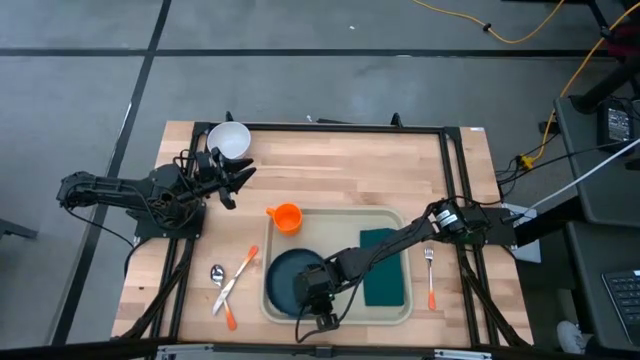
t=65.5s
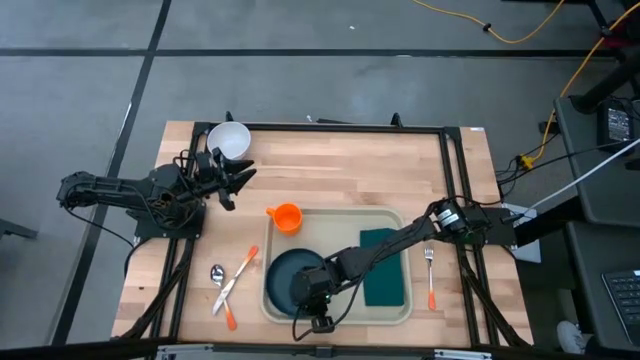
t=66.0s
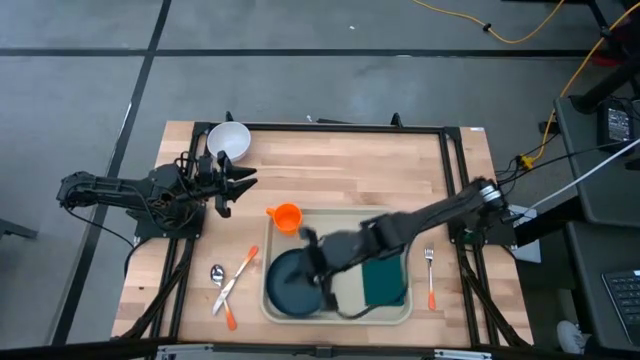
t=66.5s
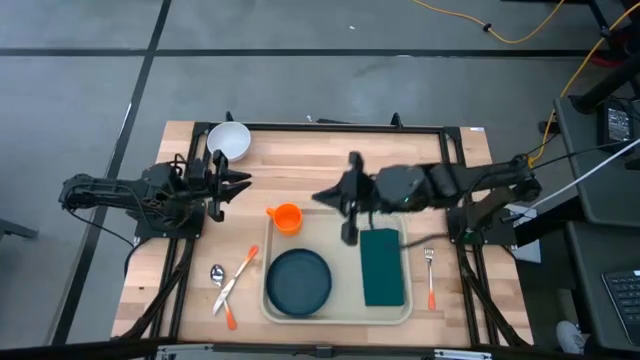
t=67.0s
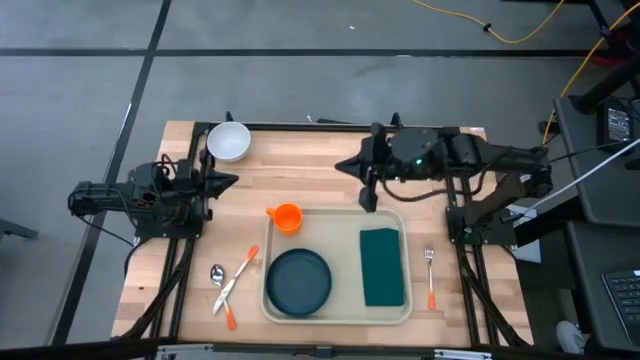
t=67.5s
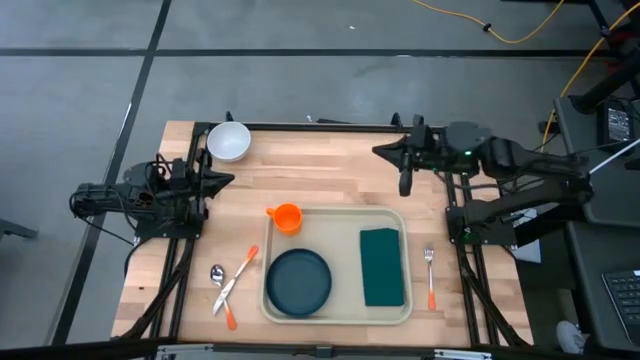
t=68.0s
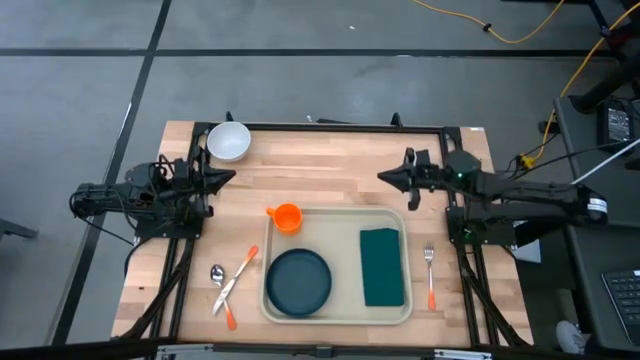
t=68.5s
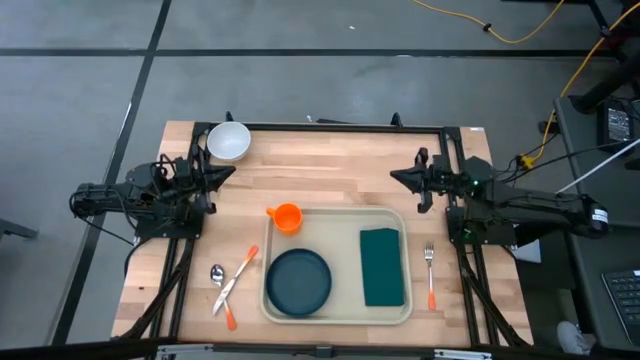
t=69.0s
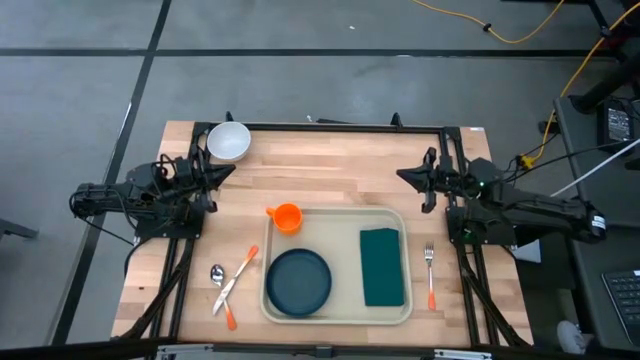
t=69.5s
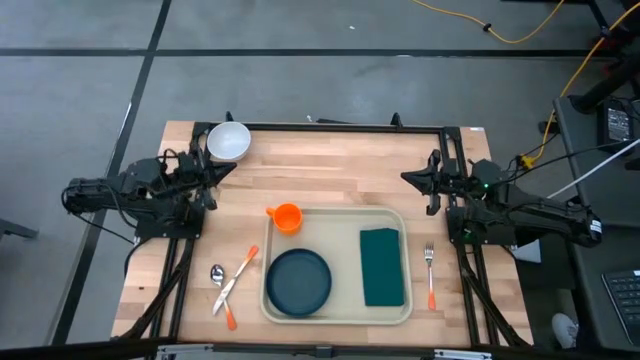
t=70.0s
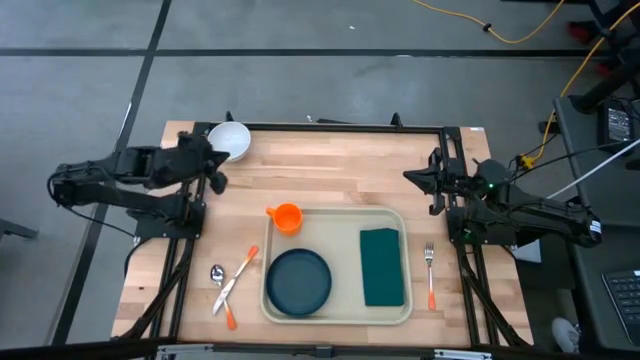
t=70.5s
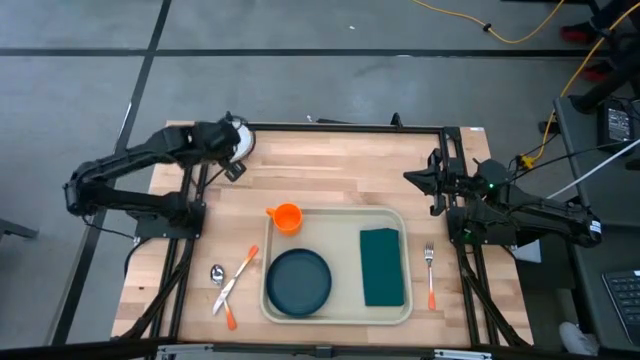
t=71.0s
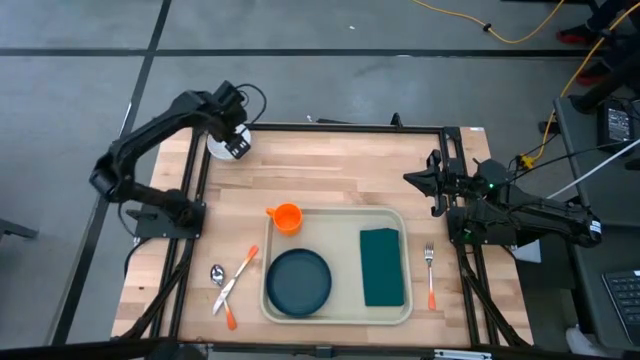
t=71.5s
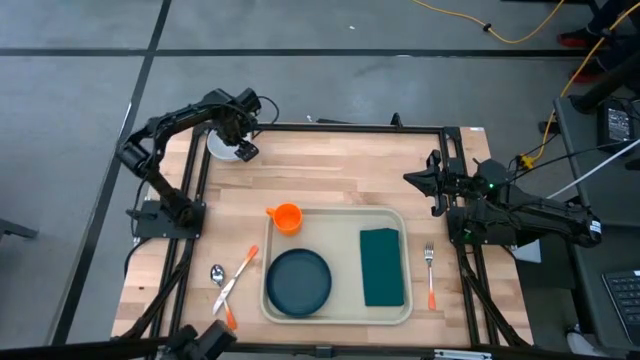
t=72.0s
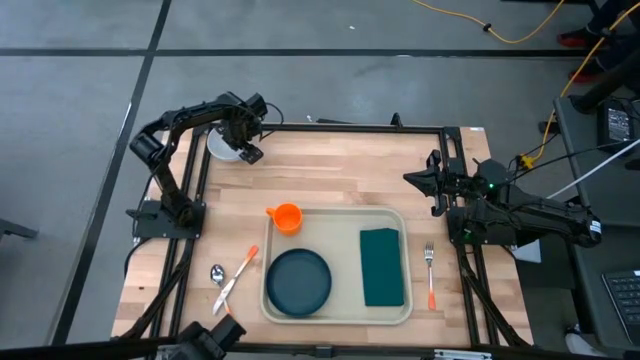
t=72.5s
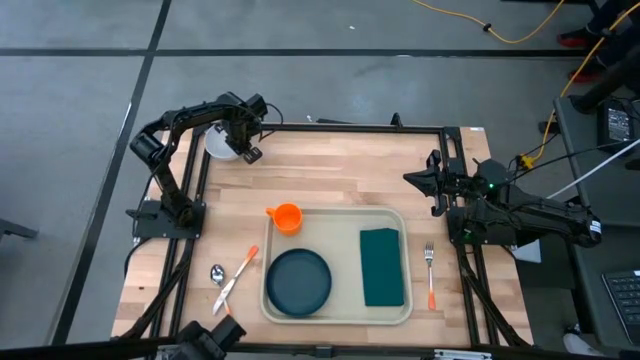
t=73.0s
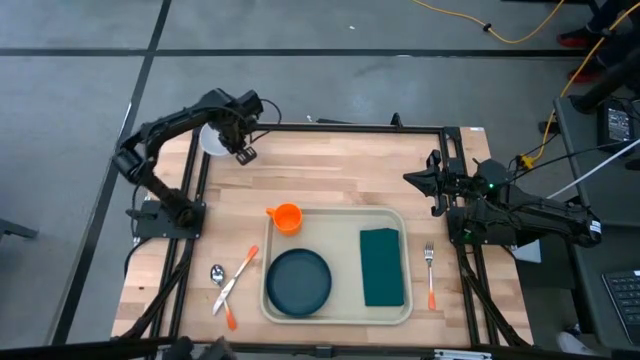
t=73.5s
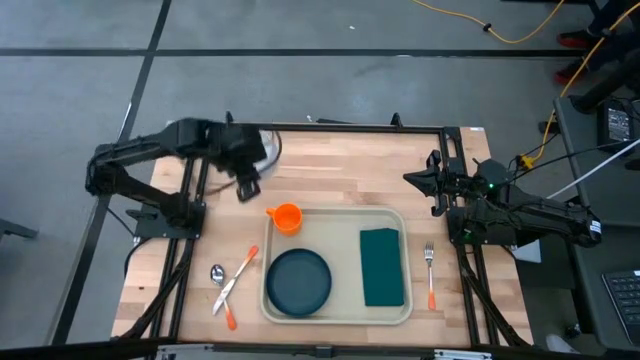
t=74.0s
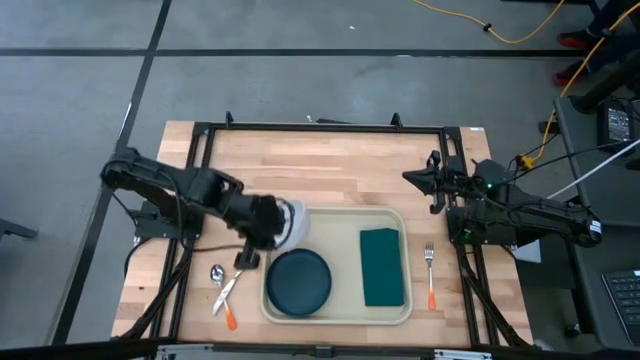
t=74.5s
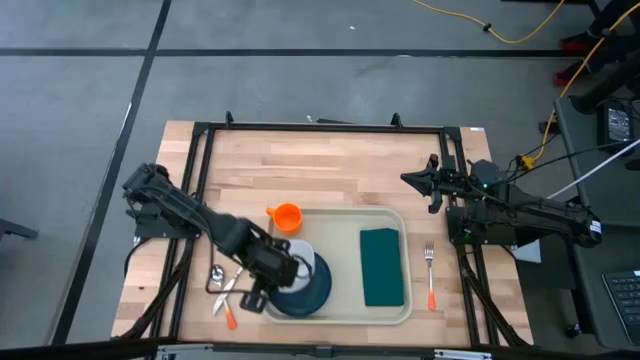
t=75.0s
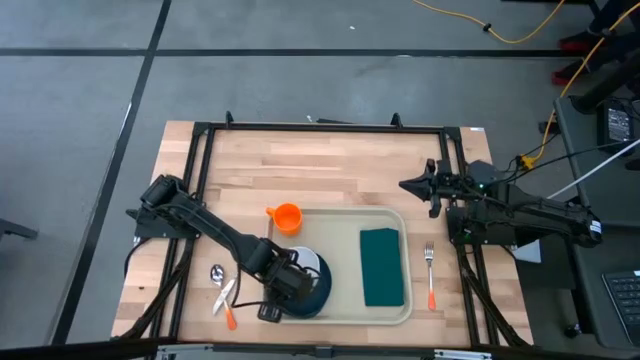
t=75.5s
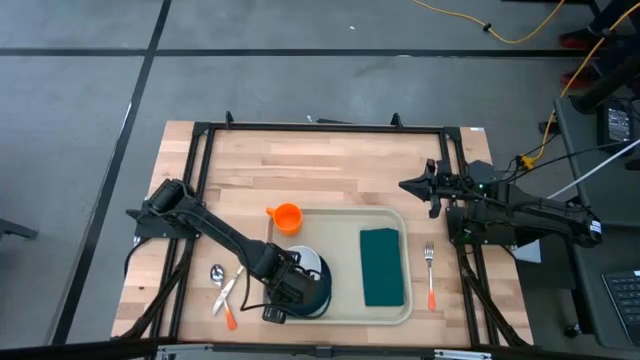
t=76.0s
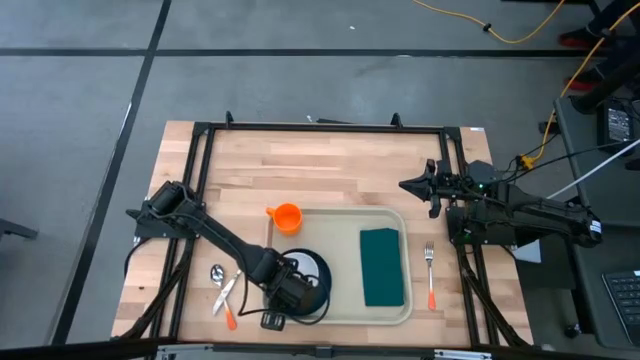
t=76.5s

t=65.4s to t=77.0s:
Task: Set up tray
Put the white bowl on the black plate

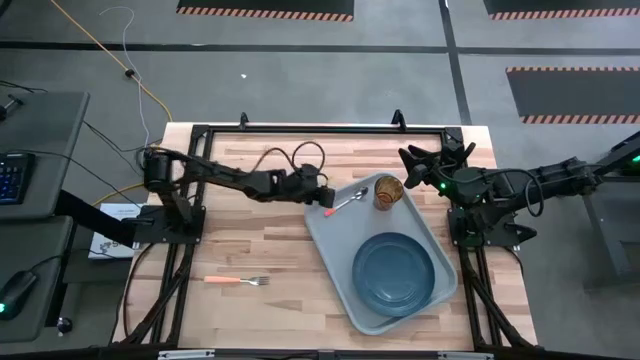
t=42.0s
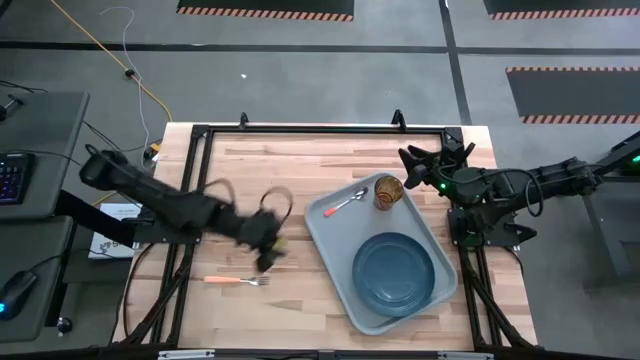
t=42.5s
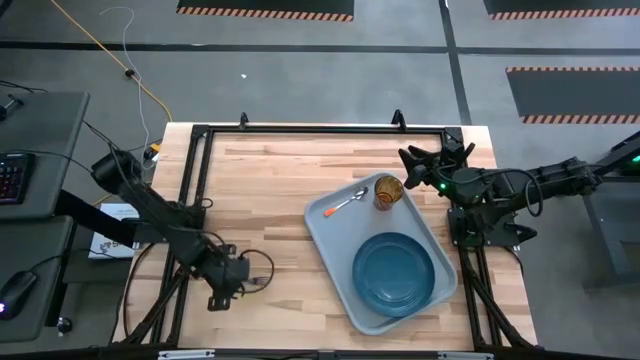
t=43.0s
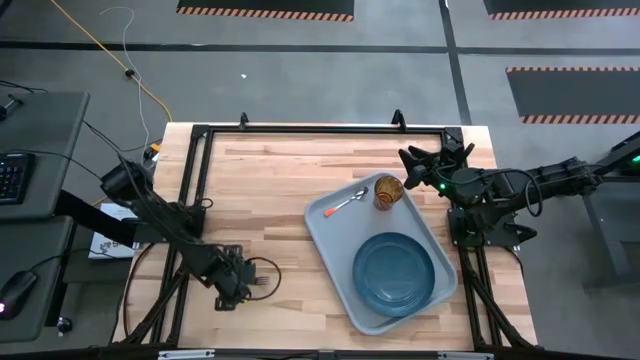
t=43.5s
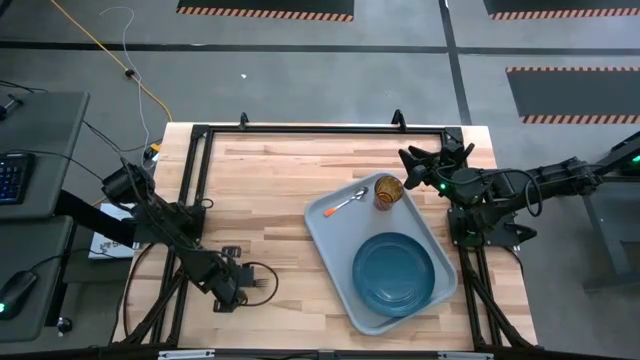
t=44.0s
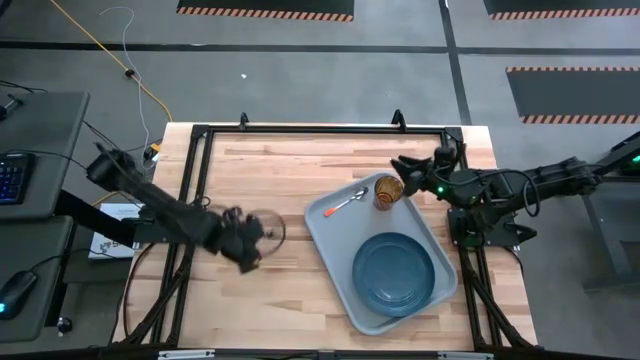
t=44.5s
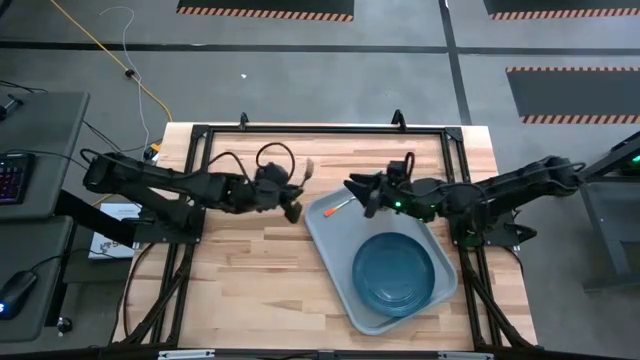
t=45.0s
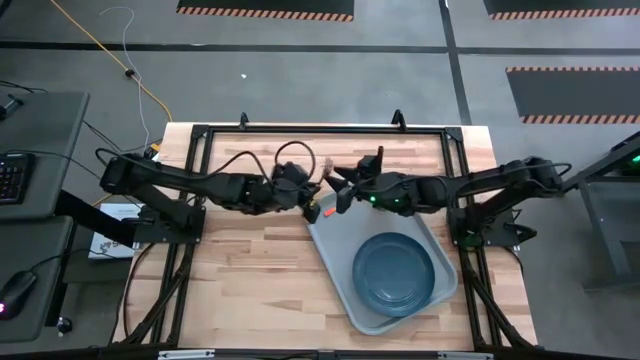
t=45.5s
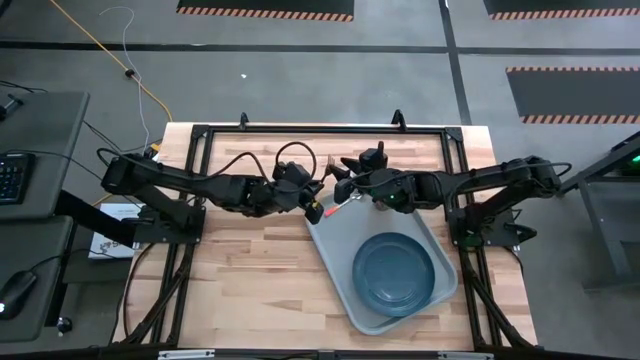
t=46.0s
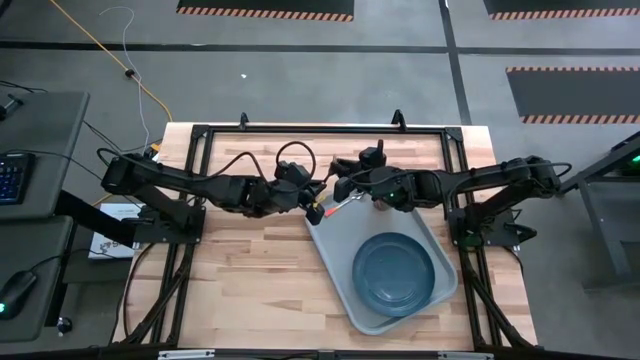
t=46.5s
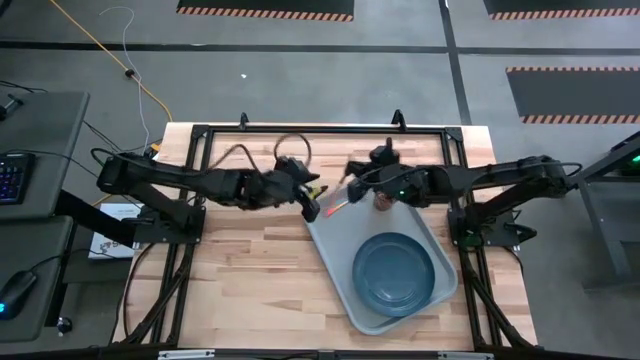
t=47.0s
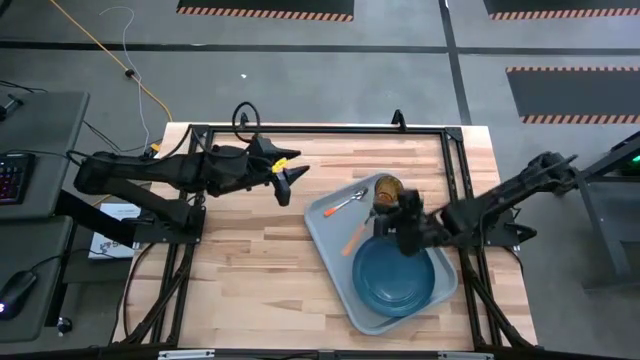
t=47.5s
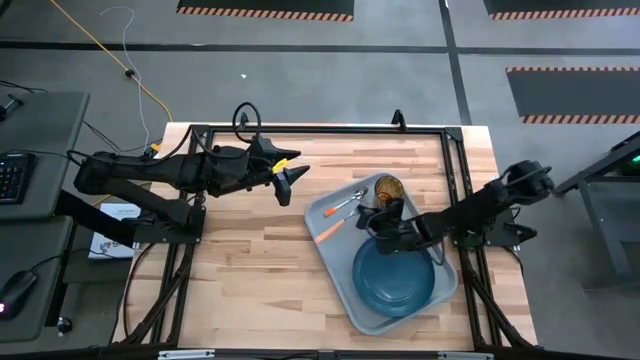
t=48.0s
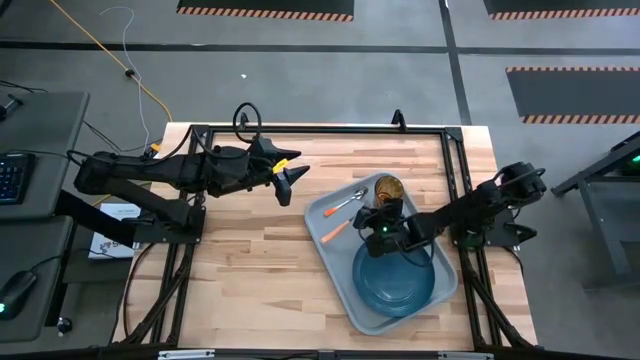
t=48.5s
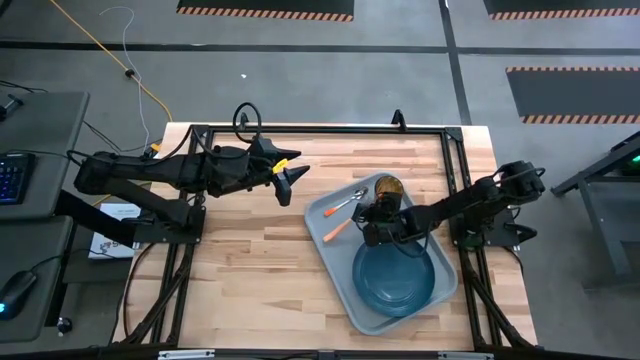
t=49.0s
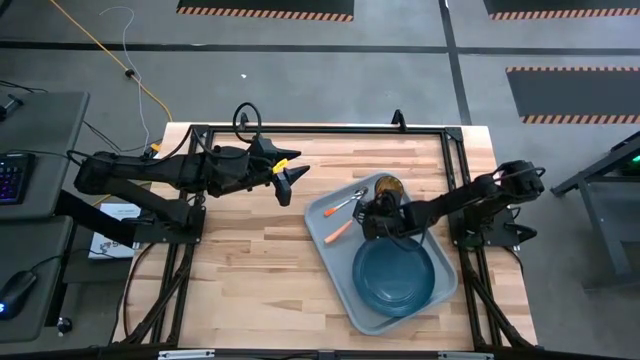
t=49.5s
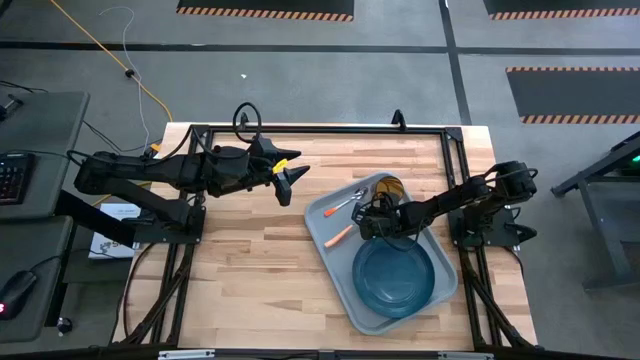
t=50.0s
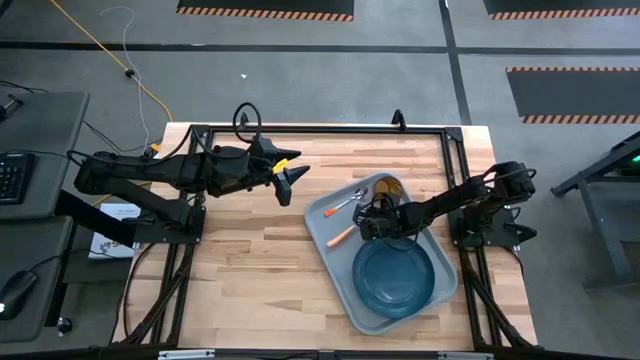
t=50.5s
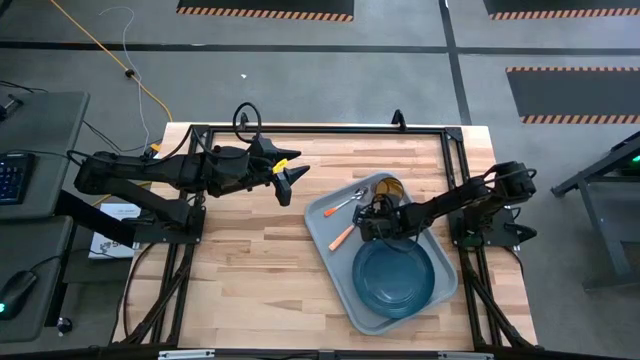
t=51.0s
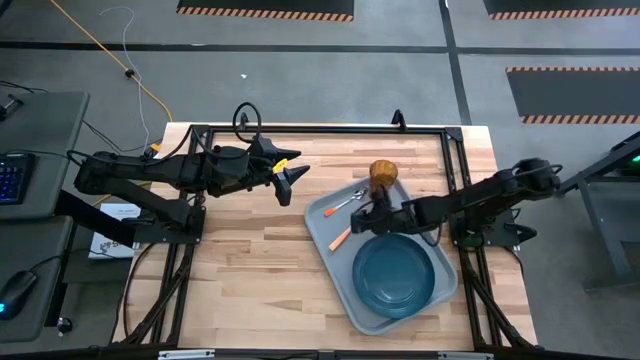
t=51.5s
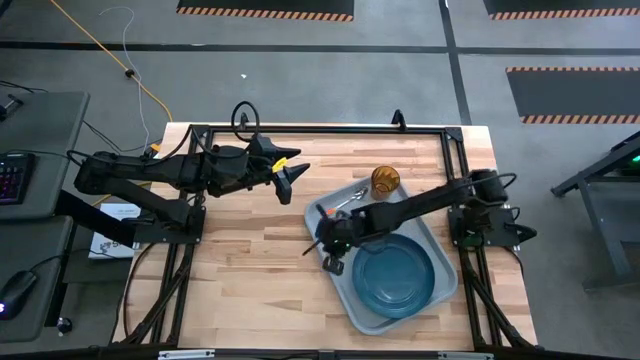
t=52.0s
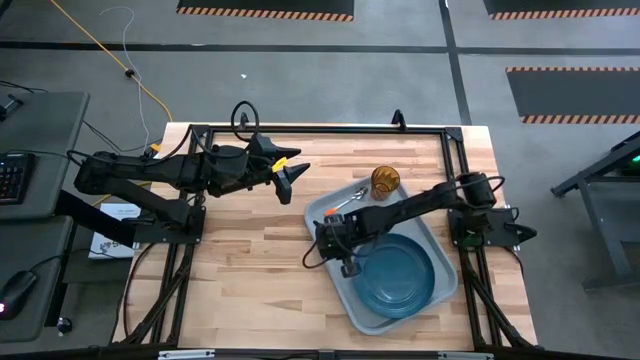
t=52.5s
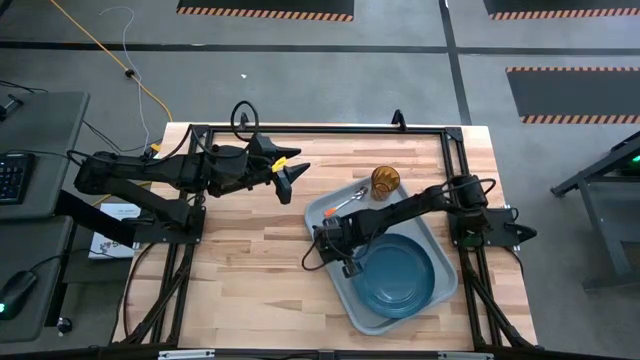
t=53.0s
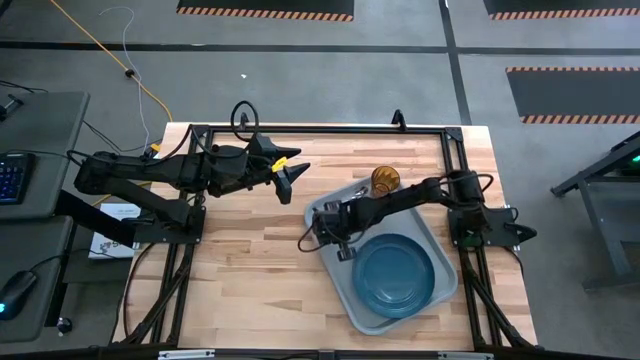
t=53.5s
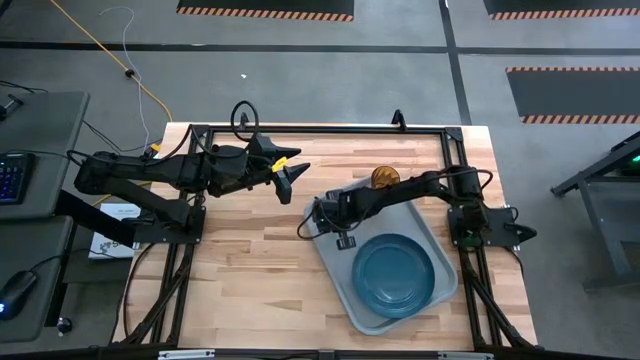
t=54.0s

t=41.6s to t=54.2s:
Task: Pick and place plate/cup/fork/spoon on tray
Put the light orange fork on the gray serving tray to the right of the orange spoon
